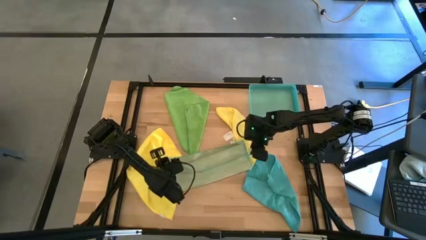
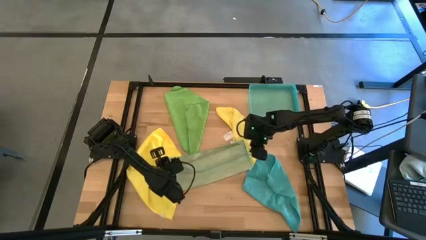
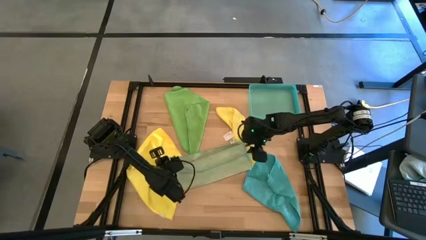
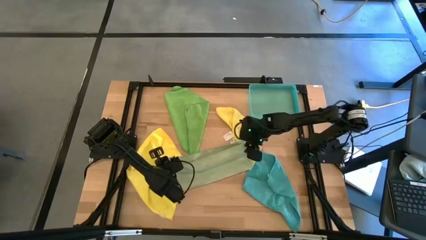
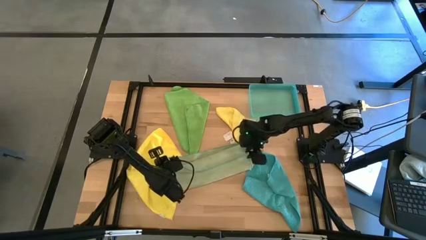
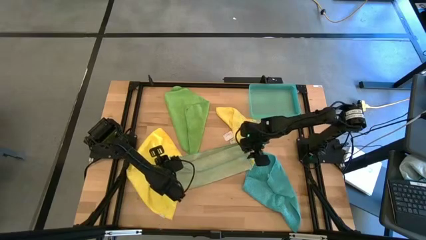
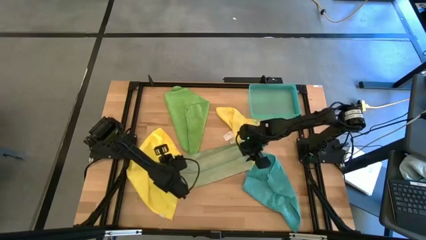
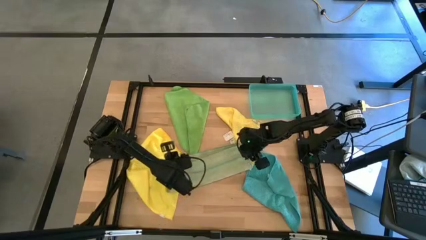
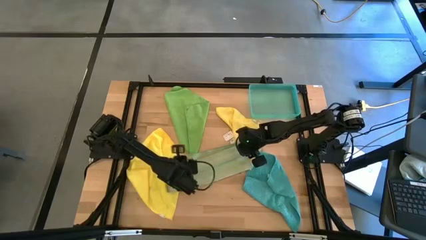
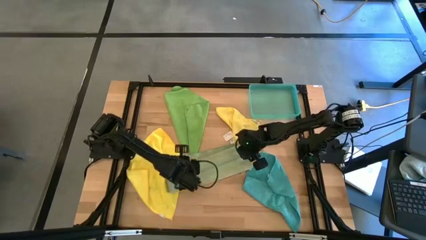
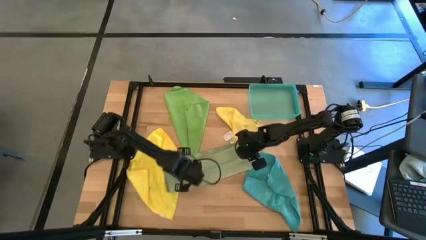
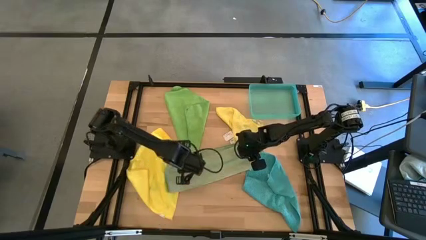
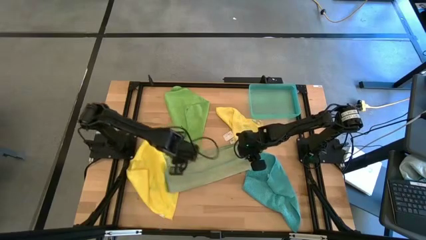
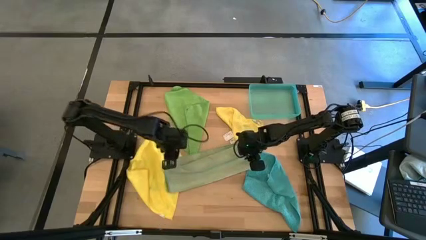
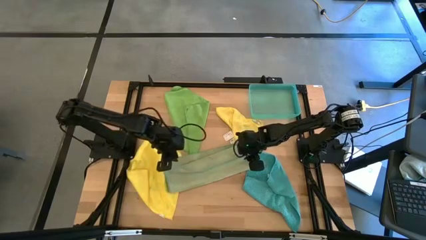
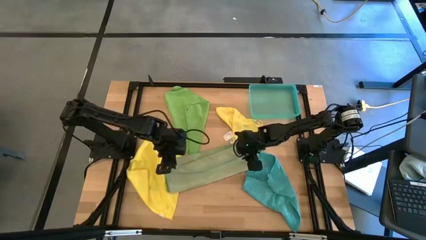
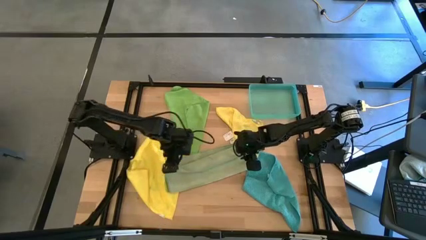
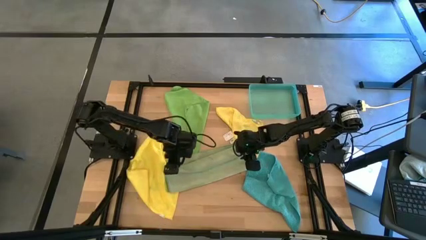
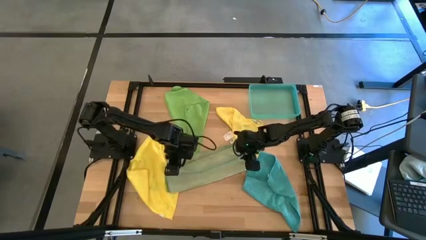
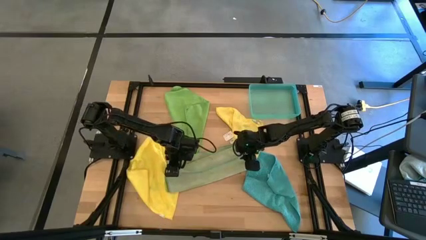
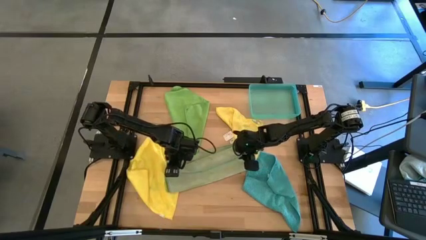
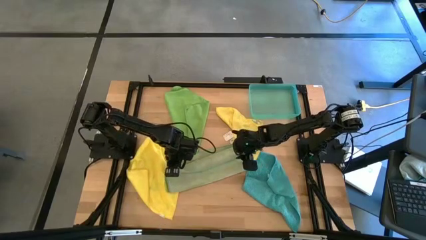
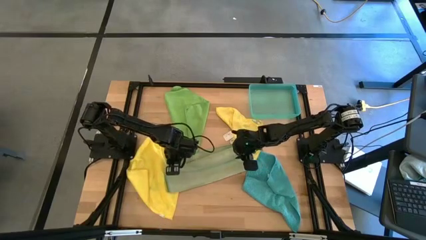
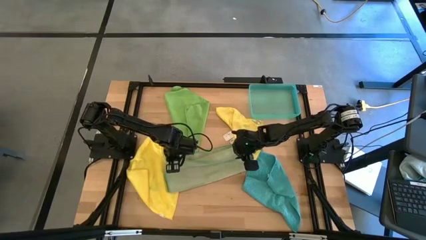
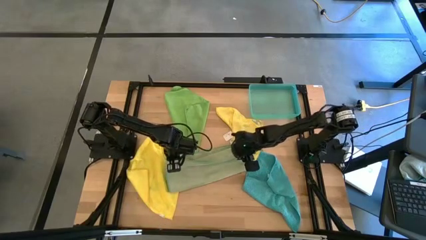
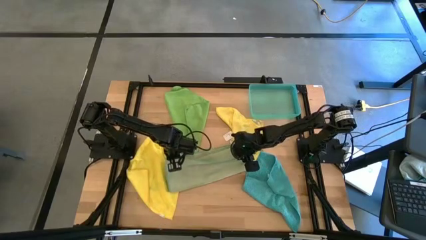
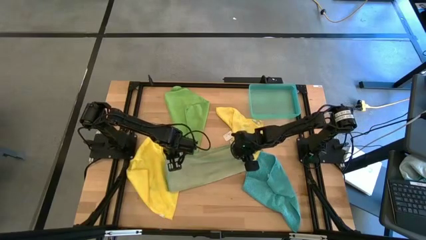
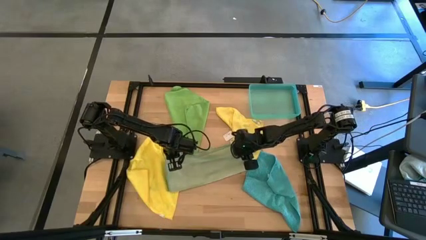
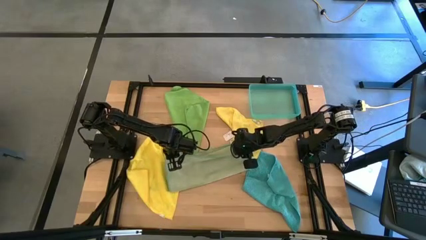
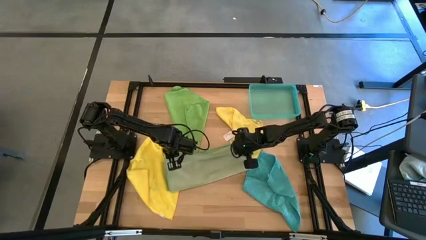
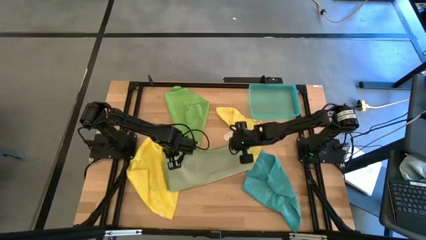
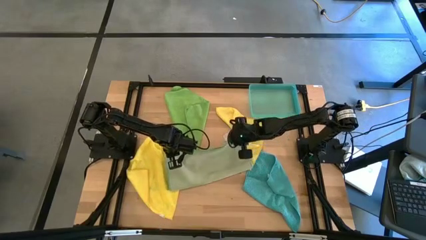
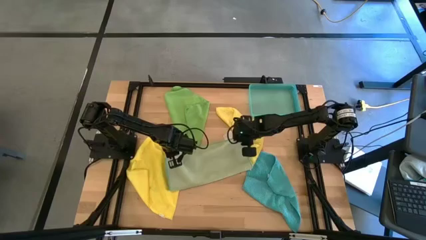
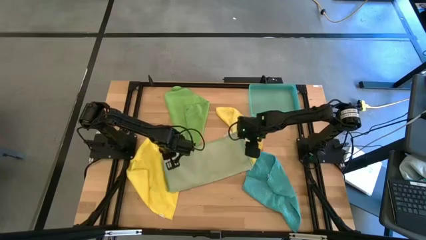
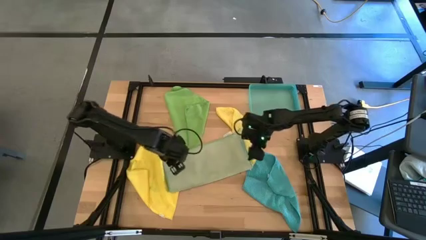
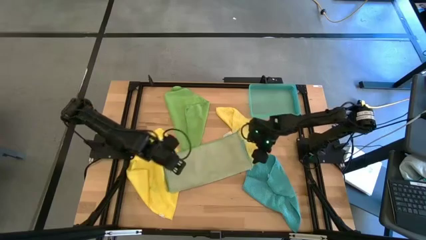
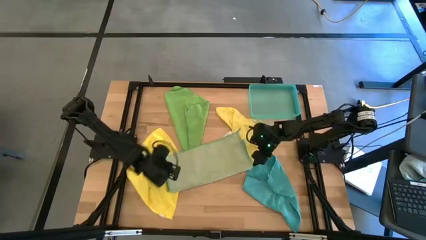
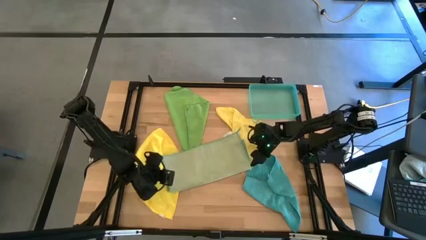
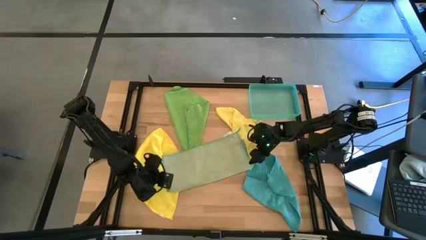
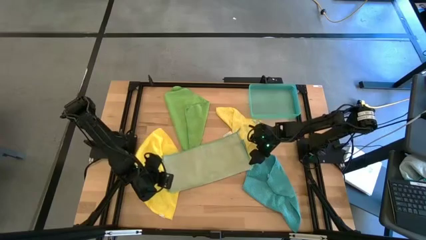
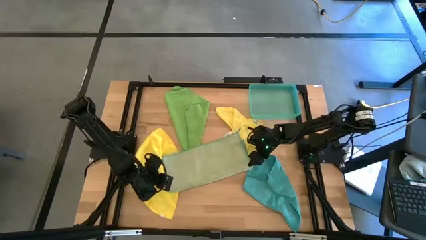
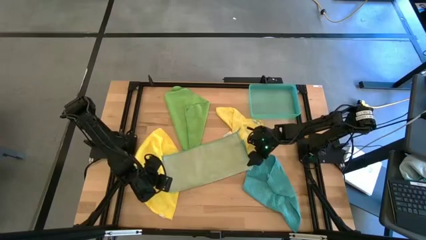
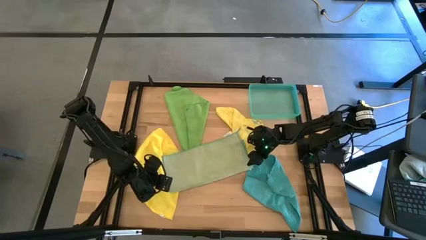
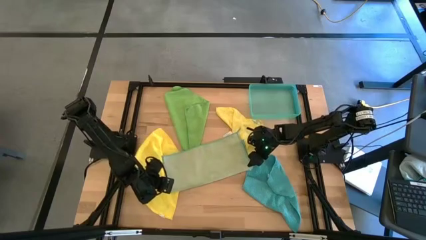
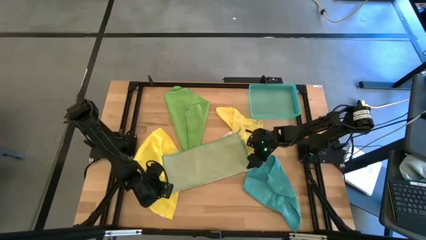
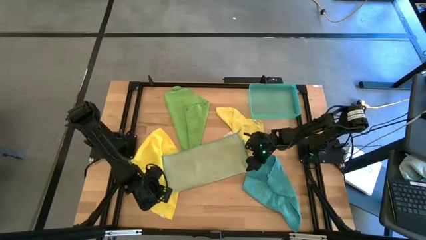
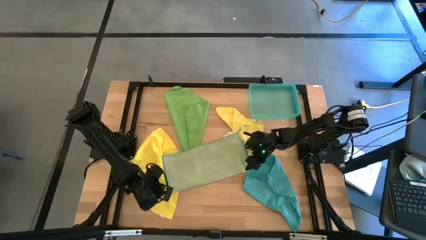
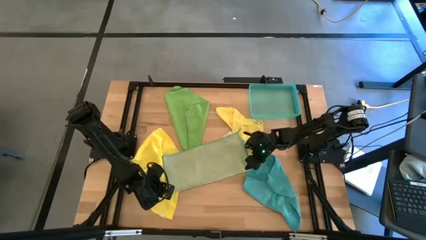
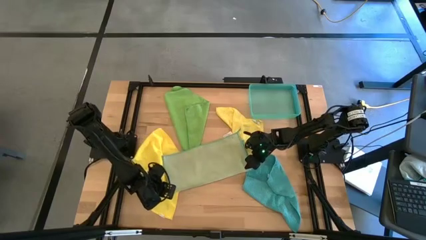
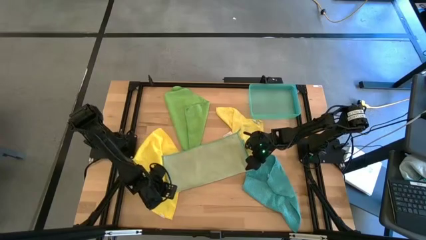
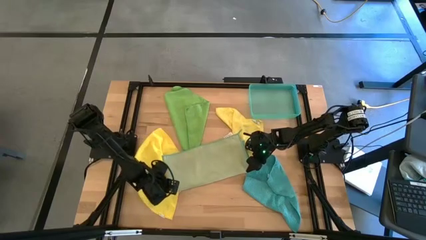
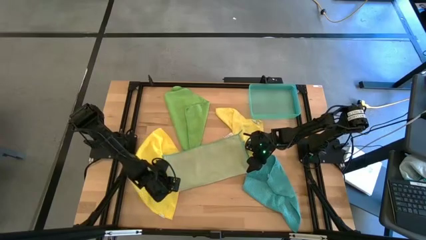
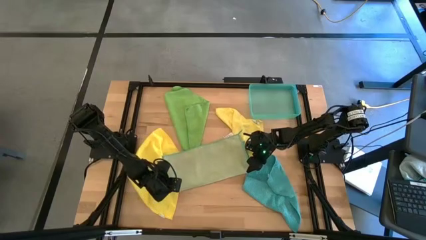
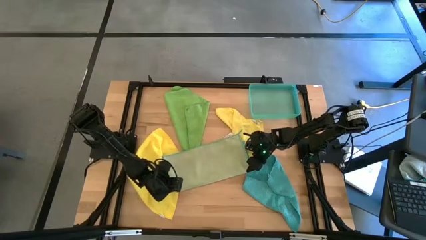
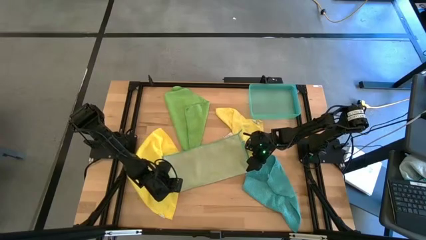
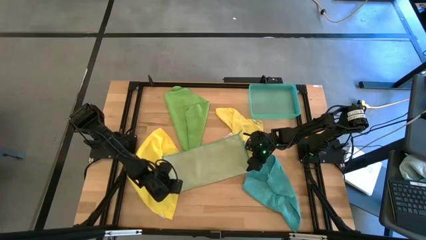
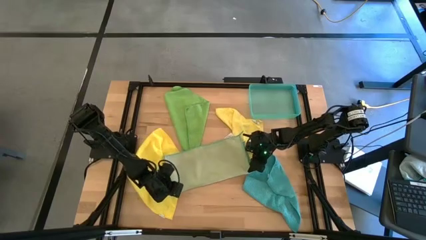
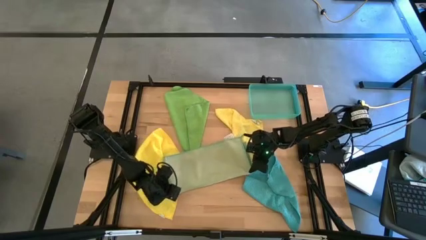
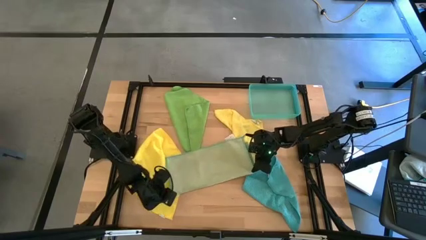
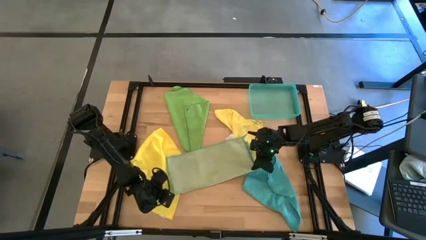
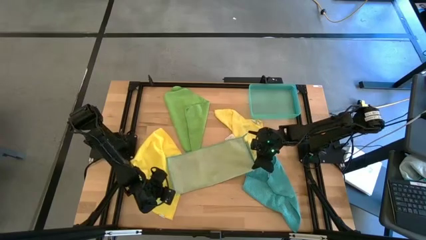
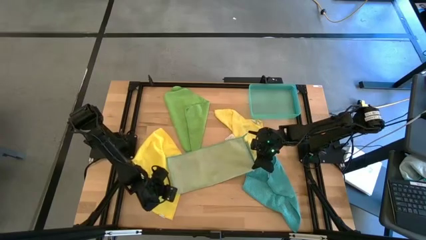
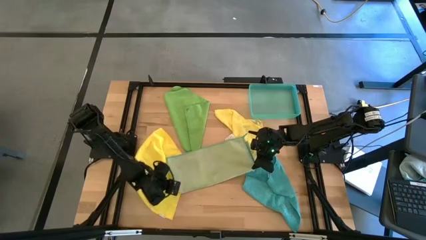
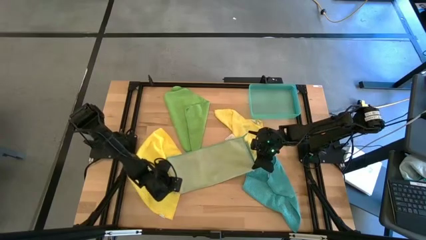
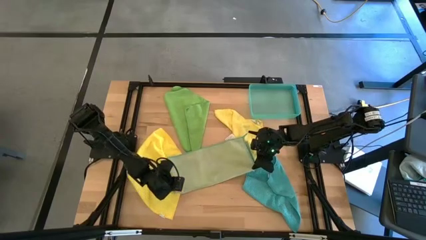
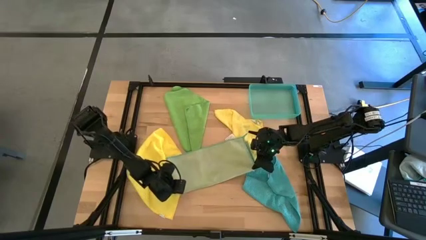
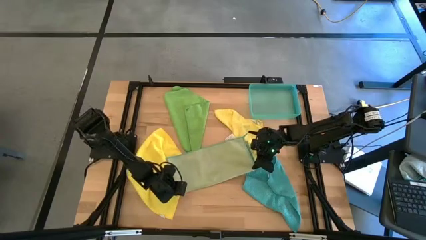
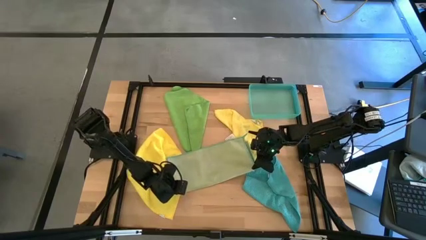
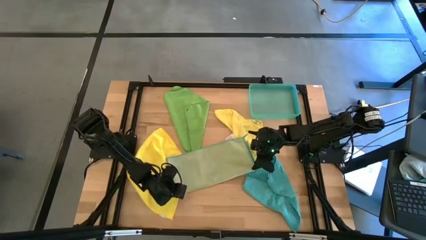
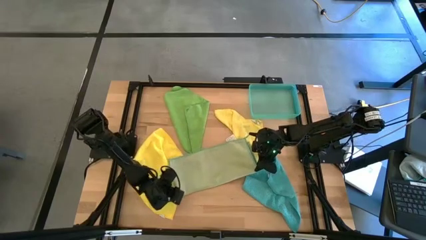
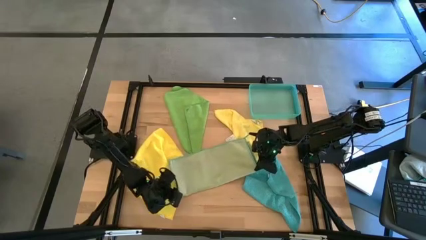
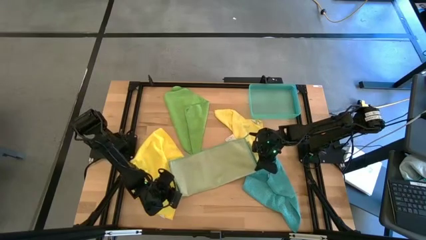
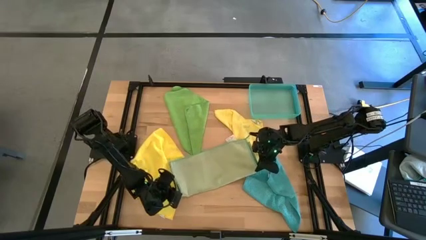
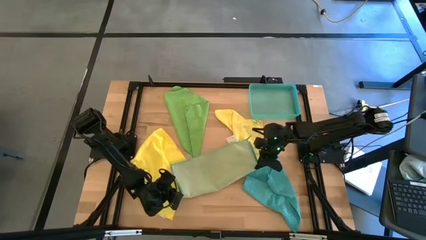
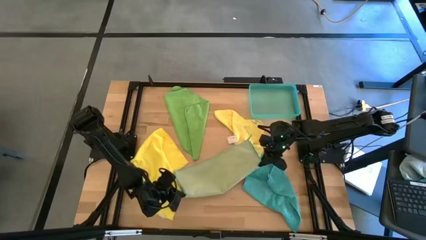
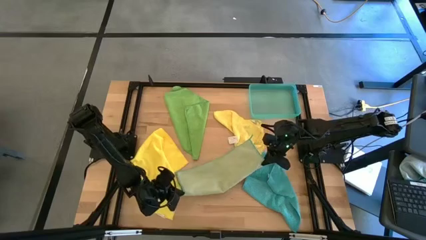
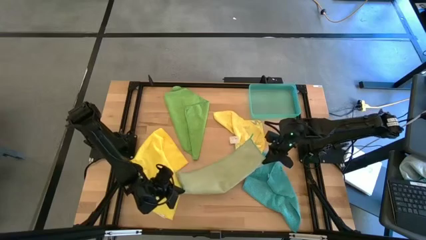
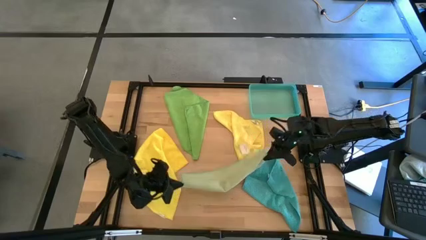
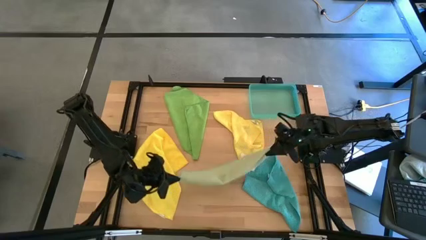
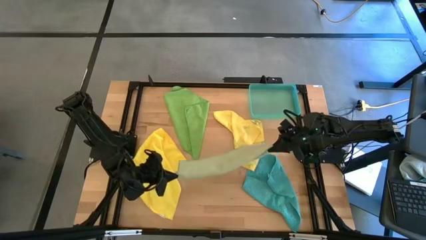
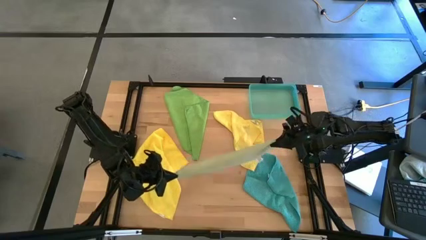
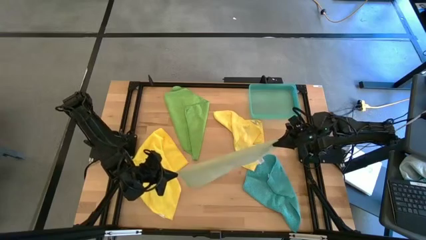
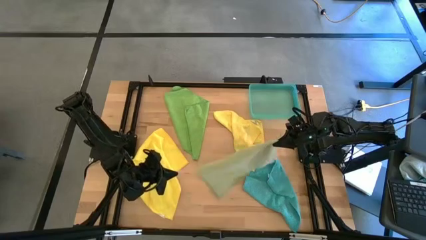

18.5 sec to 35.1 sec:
Task: Fold microfiber towels
Fold the light green microfiber cloth
